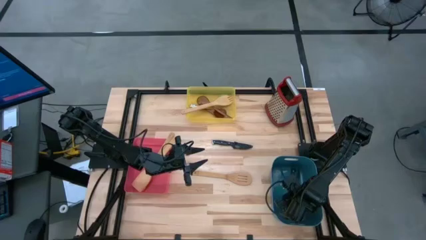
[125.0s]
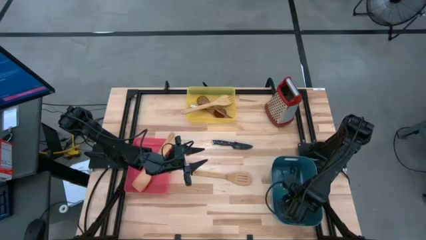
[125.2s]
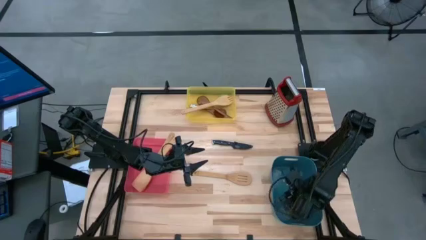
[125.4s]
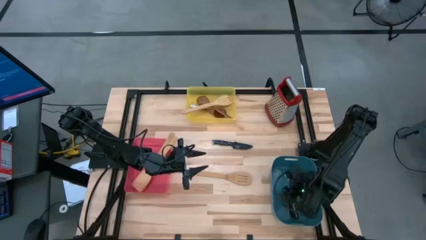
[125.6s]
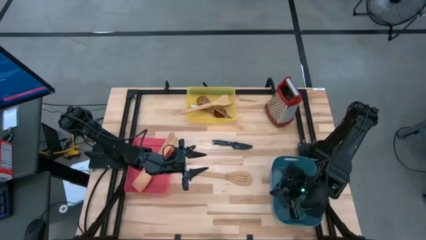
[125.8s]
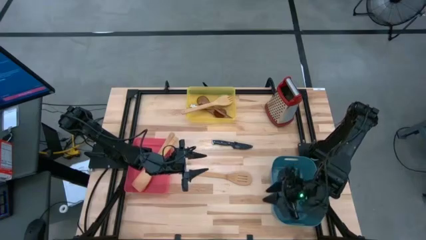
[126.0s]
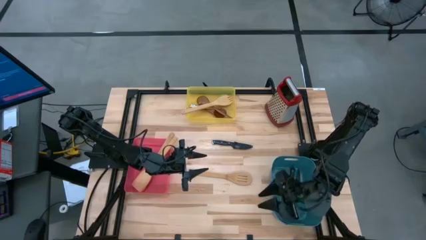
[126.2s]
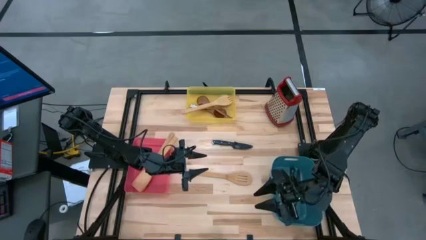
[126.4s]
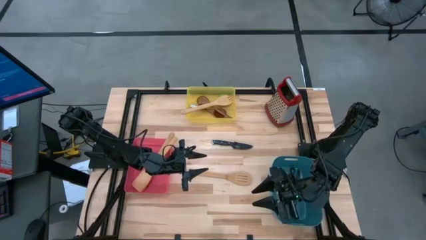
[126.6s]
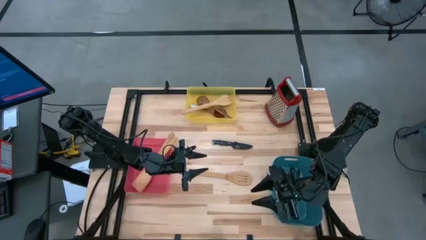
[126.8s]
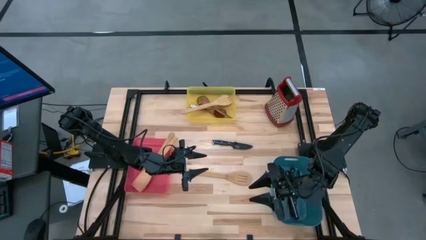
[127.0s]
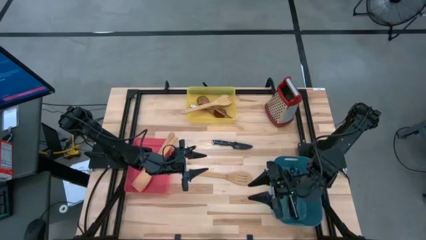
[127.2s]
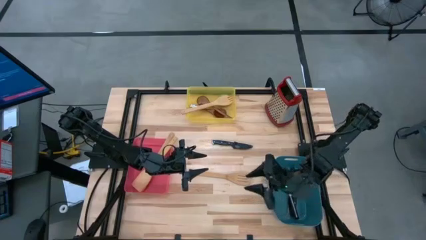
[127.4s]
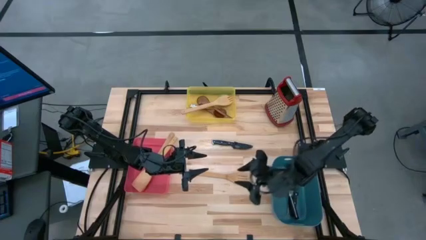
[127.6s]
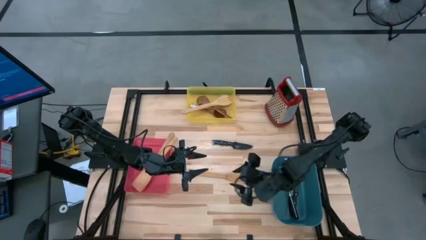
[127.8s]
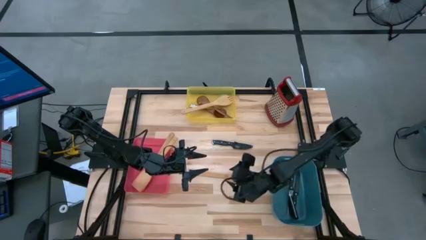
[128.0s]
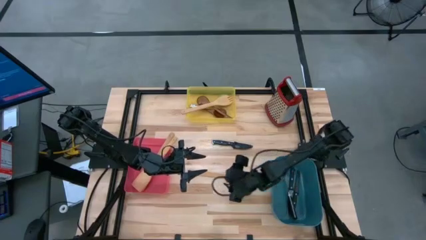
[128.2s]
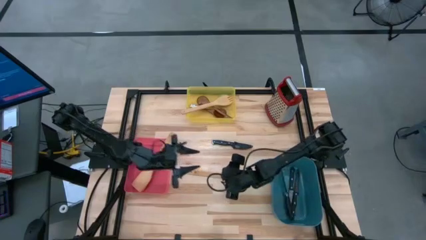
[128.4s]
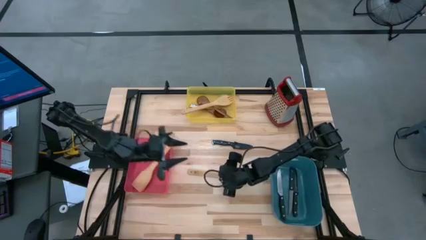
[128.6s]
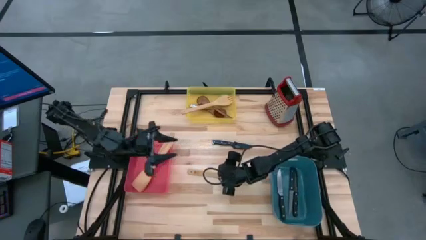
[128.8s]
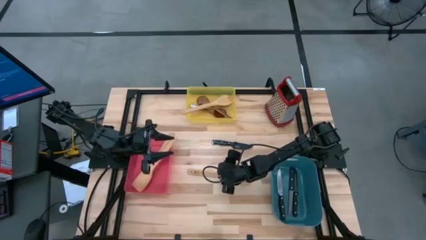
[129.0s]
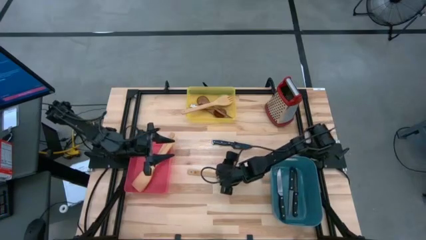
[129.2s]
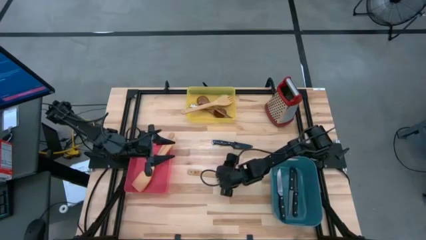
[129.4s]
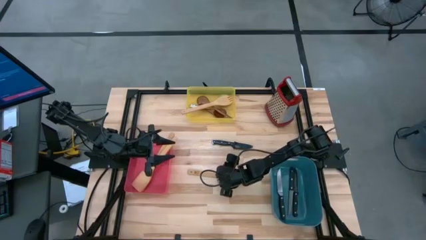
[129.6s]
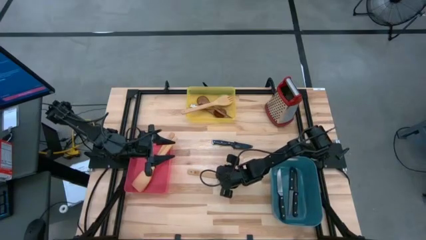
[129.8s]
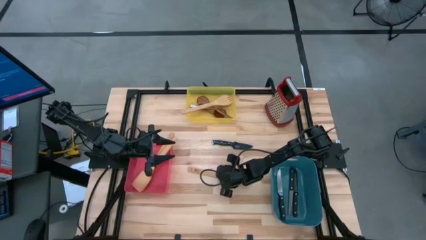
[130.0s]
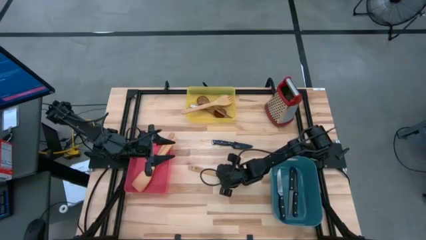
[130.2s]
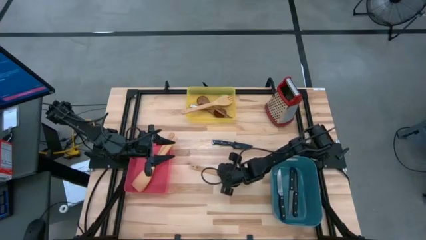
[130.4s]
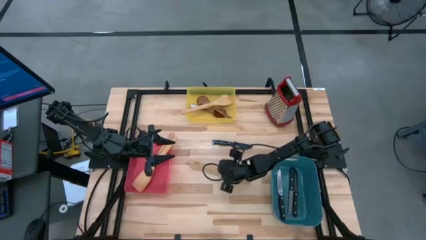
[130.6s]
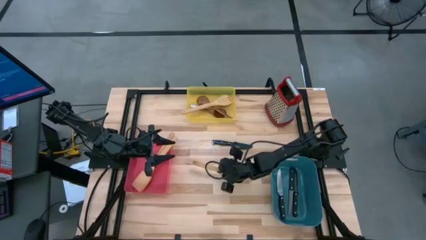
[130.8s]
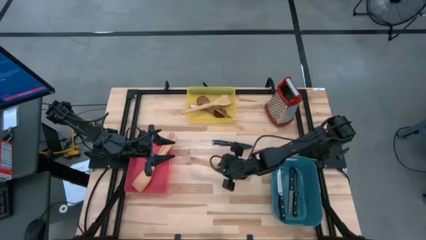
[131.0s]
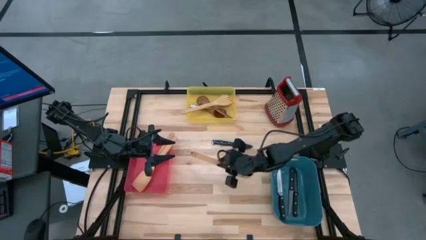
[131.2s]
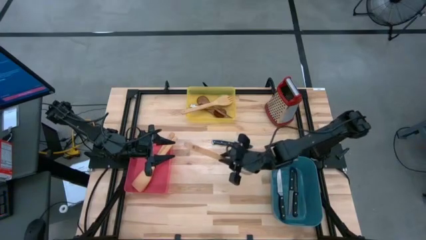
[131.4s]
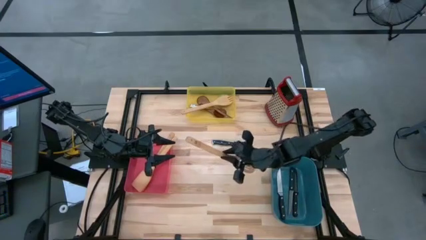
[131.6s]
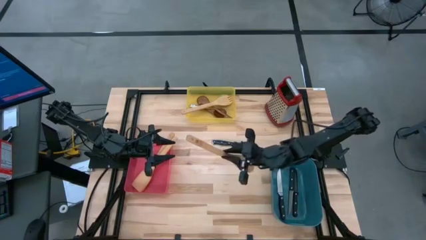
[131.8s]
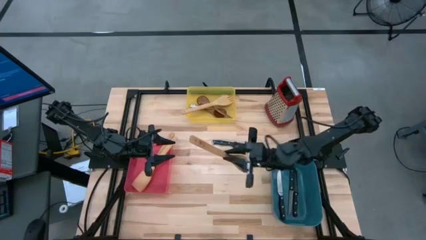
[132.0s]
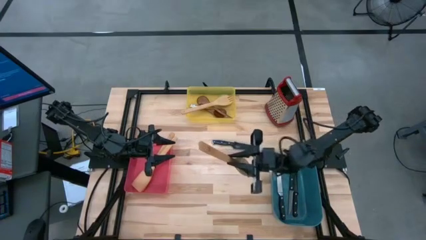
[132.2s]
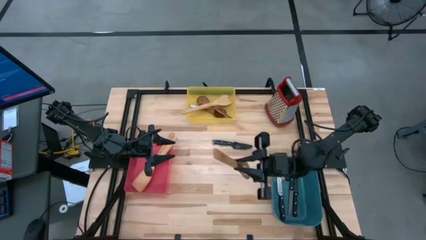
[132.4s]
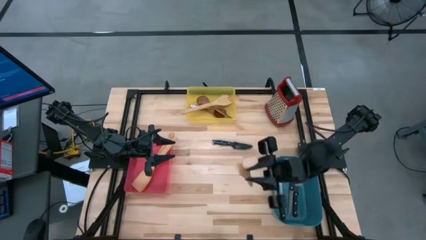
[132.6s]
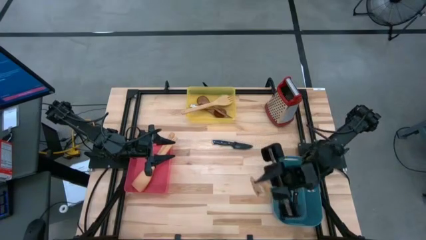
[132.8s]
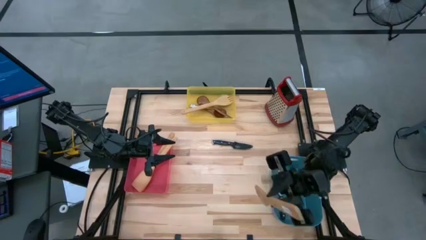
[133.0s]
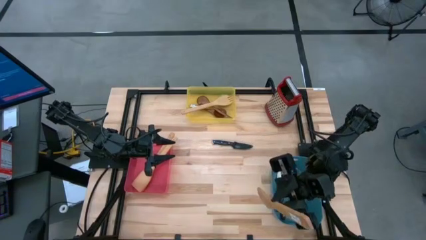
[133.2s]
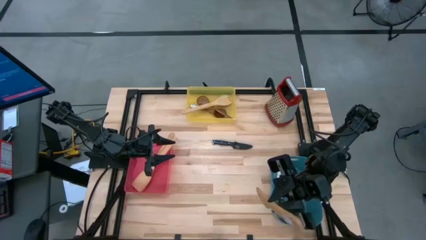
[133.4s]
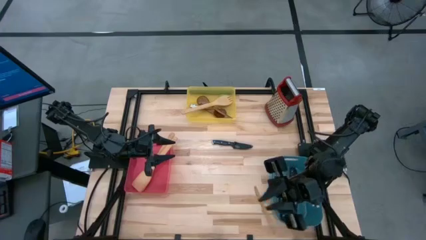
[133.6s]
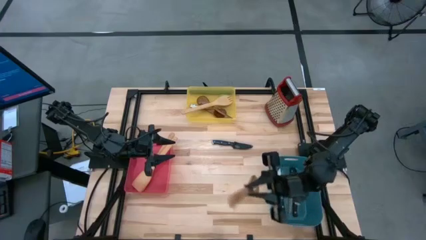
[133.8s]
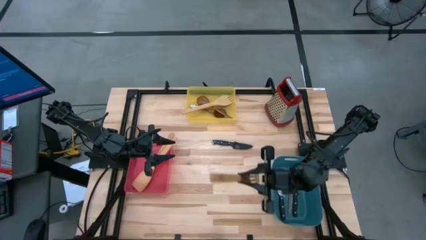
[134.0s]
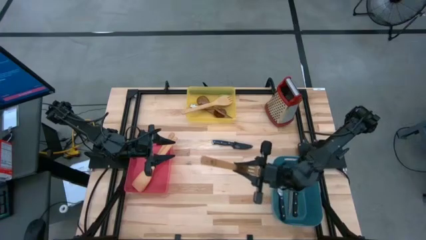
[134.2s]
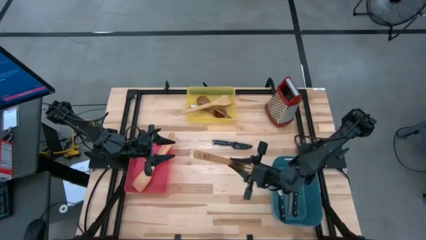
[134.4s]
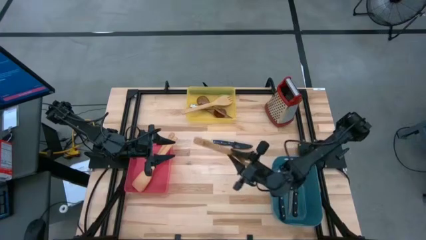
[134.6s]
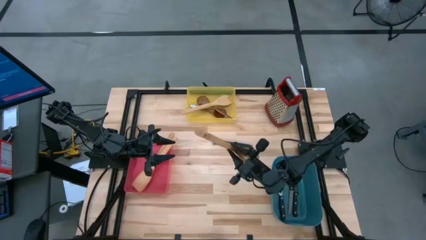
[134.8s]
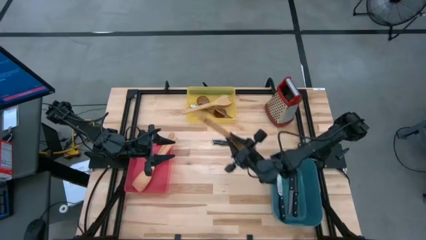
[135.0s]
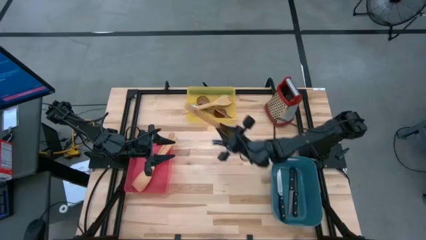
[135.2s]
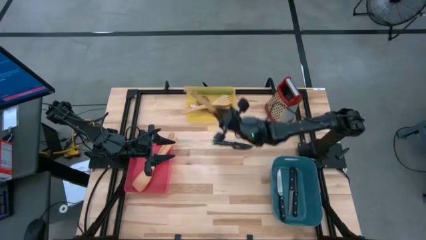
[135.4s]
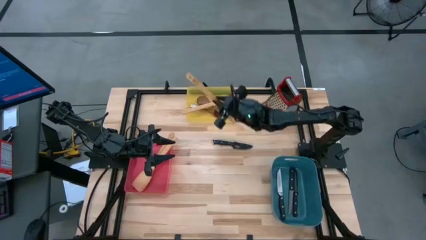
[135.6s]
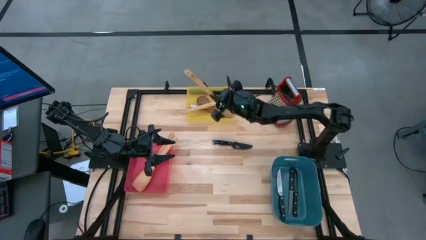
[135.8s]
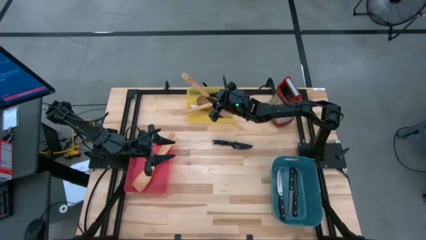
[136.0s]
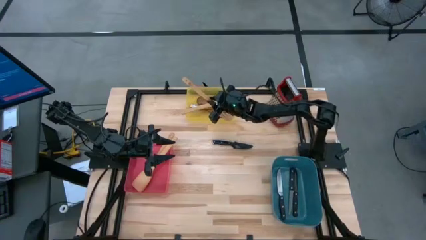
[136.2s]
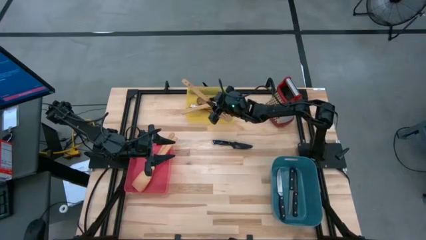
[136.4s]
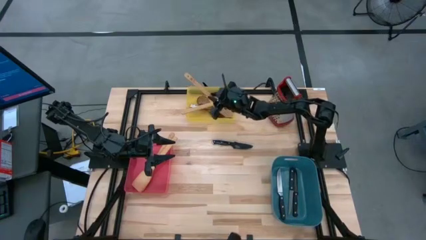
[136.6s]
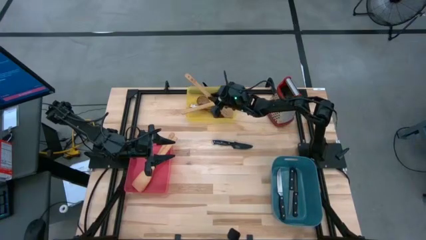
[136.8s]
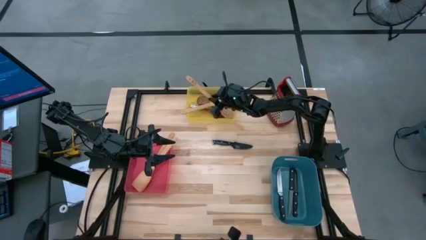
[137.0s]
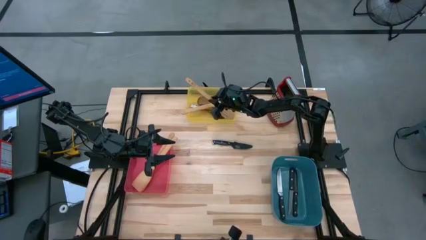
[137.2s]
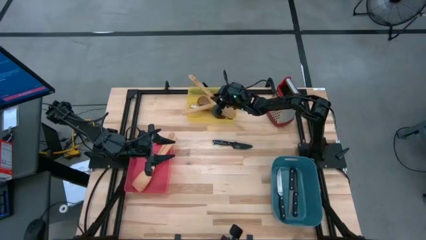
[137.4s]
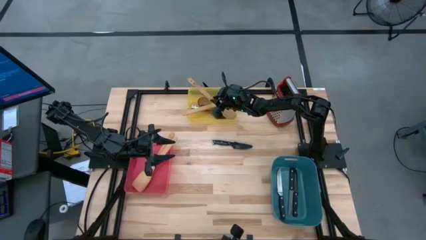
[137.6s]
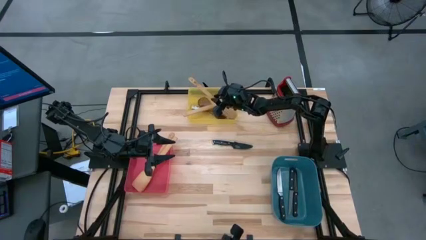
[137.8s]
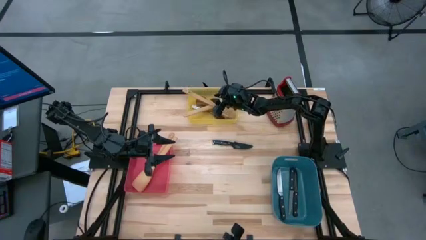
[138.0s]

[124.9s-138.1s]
Task: Pick & Place Kitchen Items
Put the brown serving spoon into the yellow bin

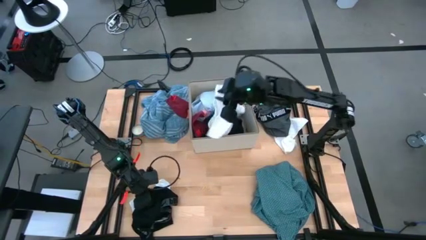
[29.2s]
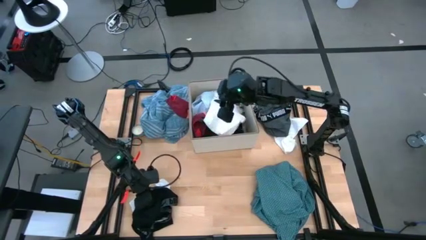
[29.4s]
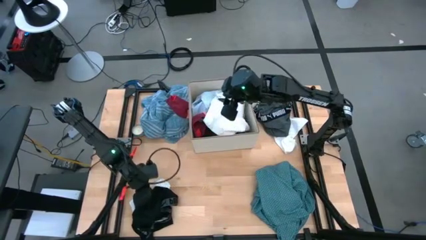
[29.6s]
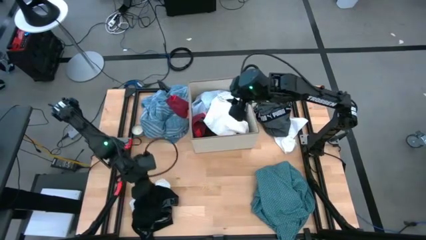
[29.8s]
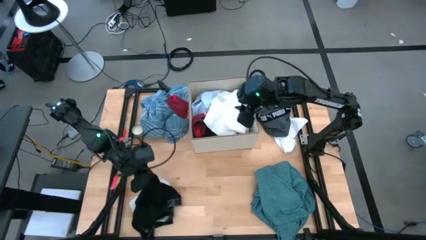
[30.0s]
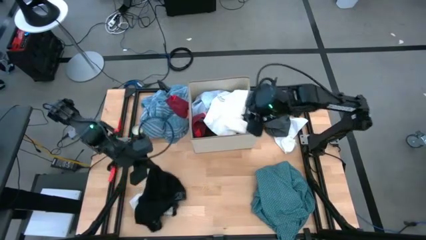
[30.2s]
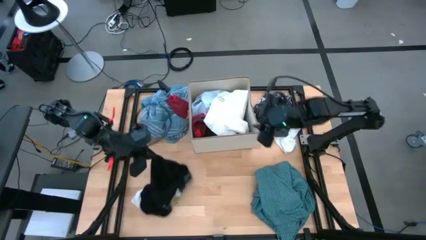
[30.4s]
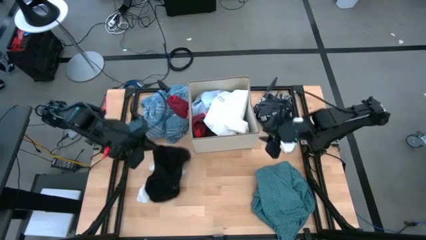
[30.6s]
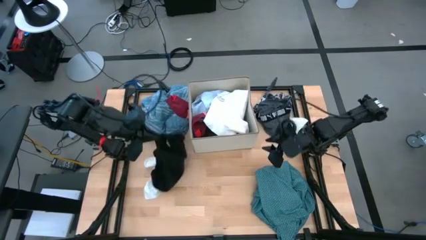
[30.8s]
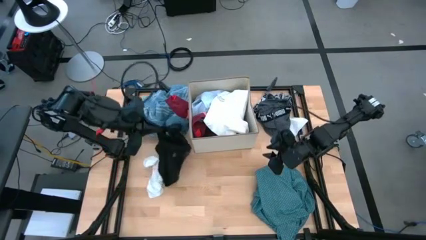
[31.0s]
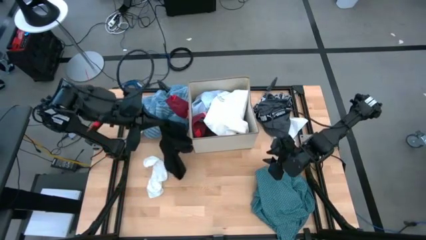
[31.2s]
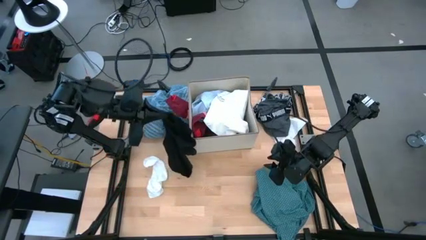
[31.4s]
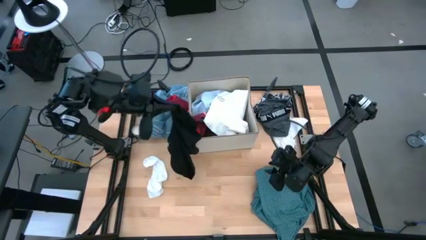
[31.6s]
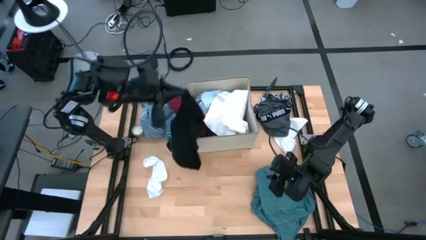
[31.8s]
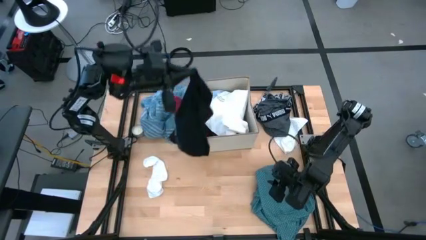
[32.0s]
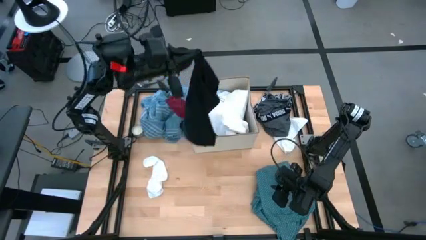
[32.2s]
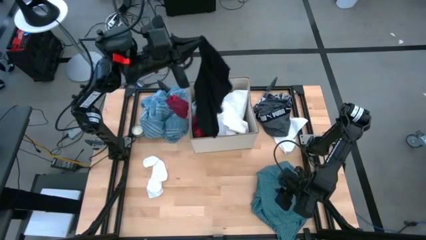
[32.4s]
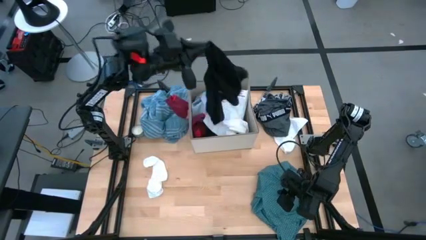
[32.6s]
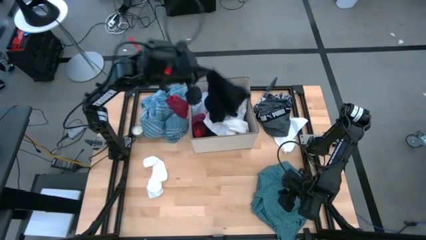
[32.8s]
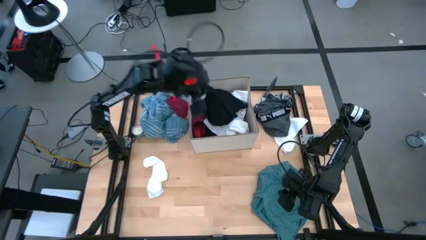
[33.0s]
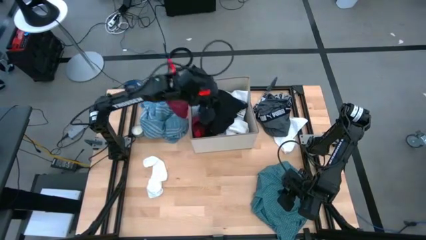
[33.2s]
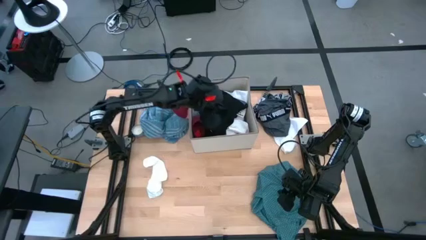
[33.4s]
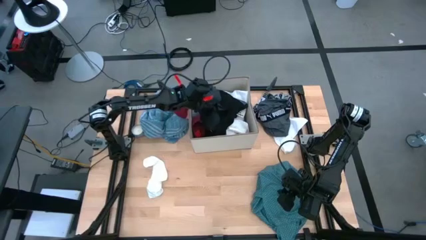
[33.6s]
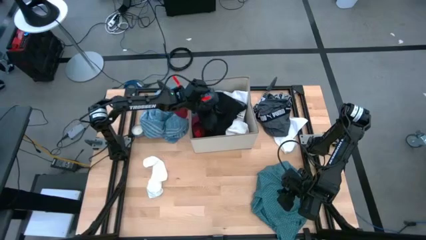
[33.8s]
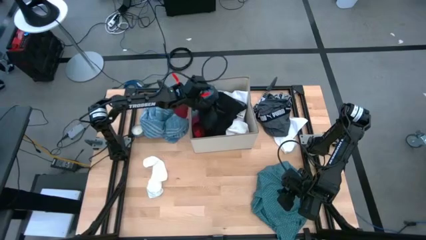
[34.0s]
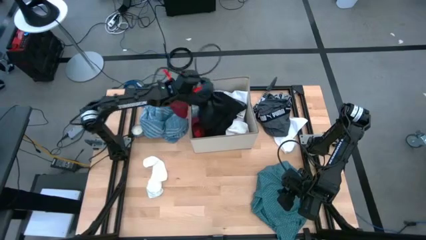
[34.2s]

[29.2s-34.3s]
Task: Sort clothes
Put the black boxer into the bin
